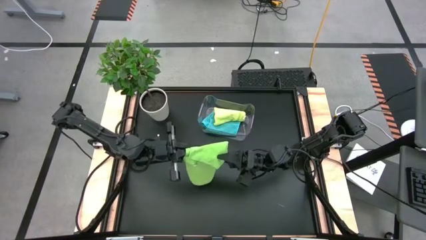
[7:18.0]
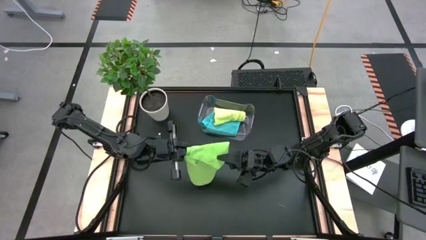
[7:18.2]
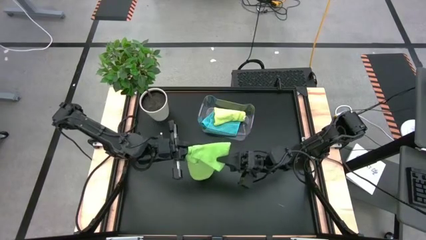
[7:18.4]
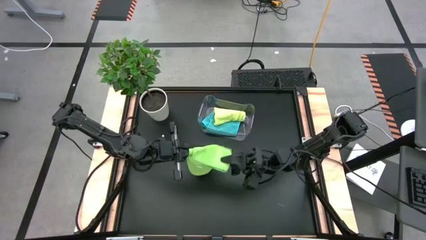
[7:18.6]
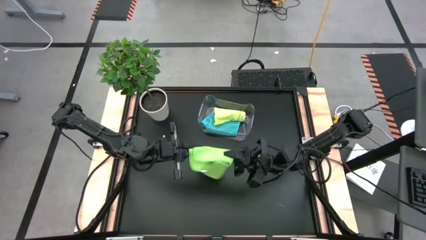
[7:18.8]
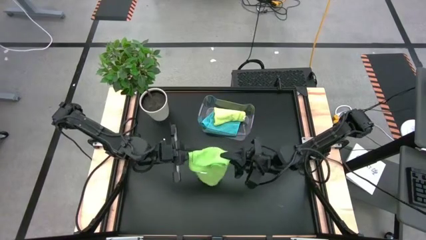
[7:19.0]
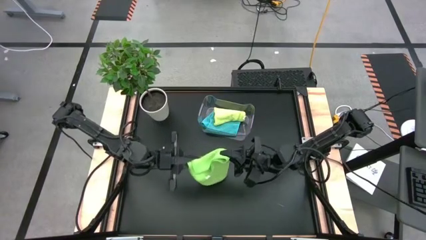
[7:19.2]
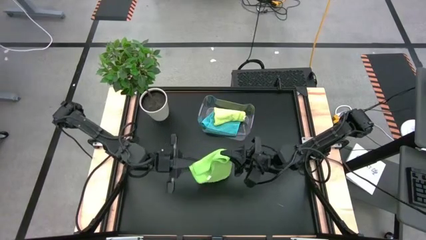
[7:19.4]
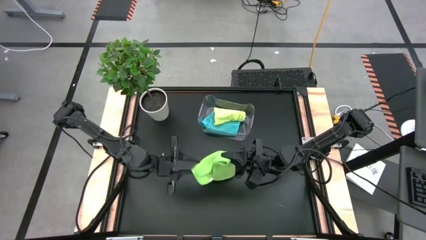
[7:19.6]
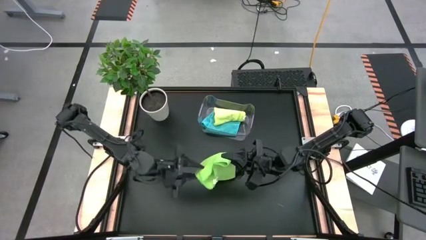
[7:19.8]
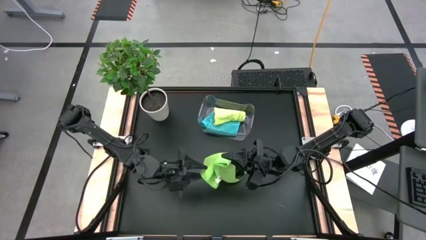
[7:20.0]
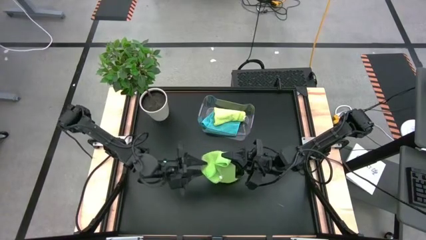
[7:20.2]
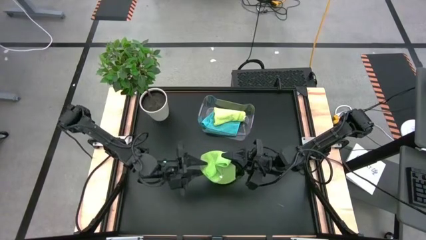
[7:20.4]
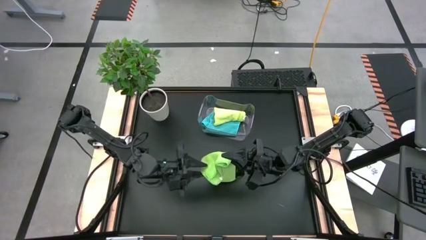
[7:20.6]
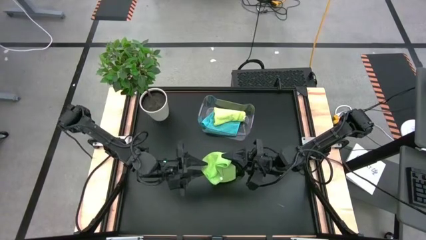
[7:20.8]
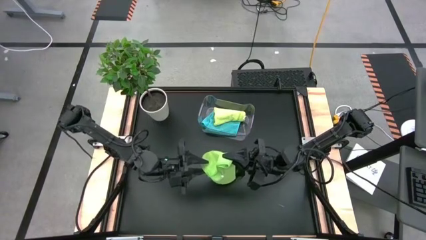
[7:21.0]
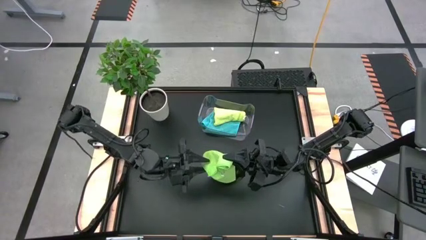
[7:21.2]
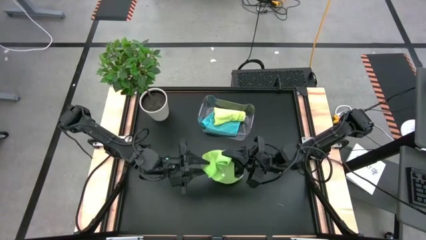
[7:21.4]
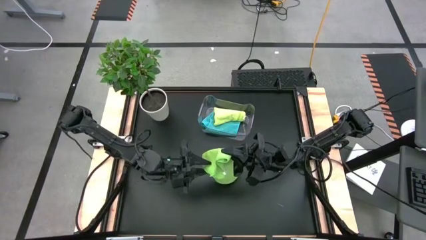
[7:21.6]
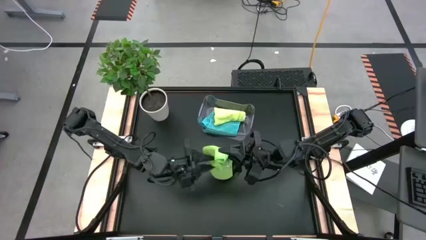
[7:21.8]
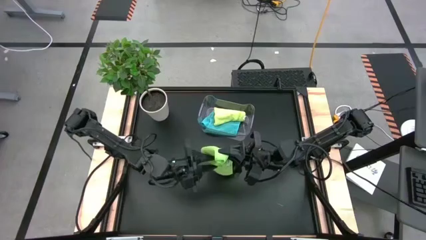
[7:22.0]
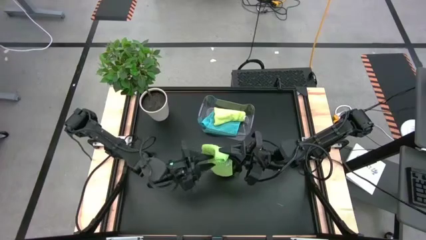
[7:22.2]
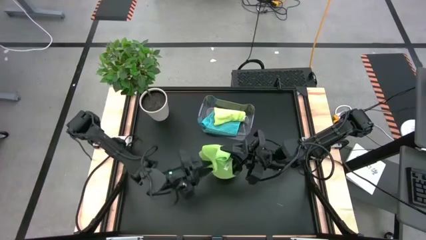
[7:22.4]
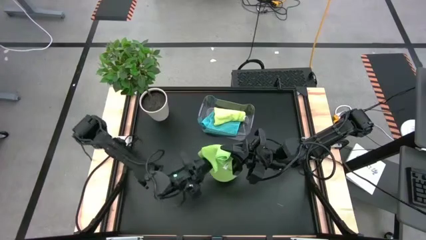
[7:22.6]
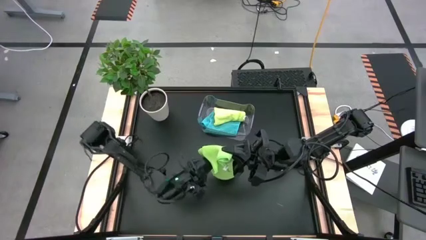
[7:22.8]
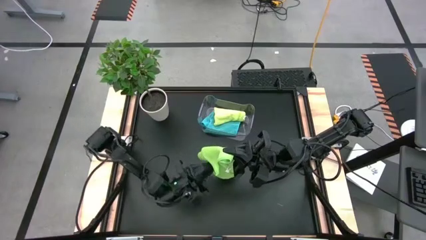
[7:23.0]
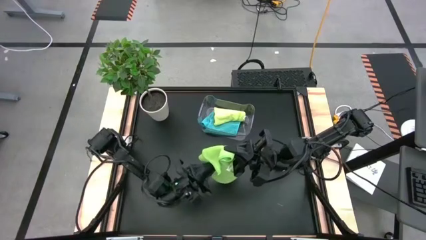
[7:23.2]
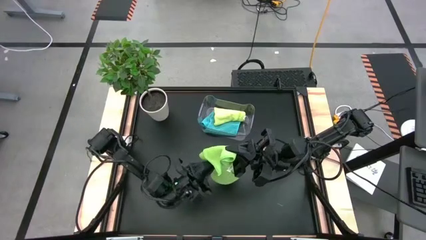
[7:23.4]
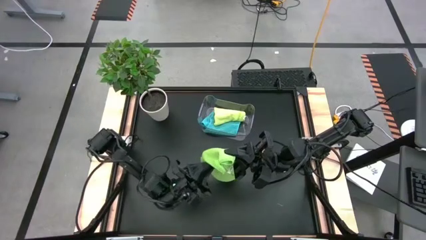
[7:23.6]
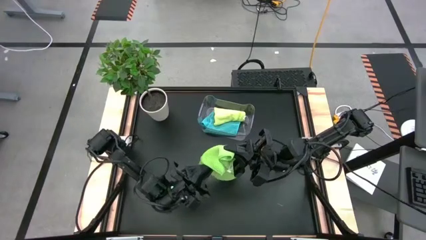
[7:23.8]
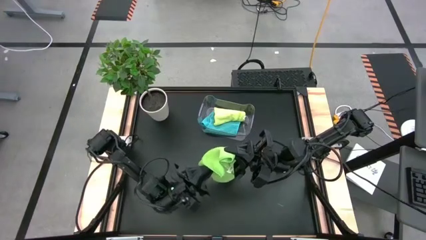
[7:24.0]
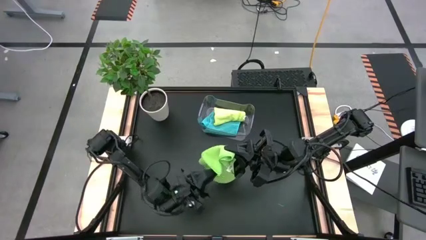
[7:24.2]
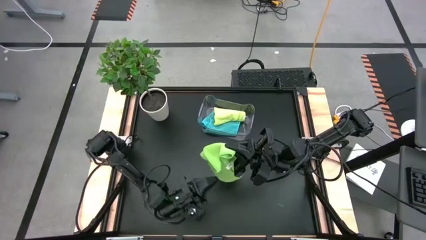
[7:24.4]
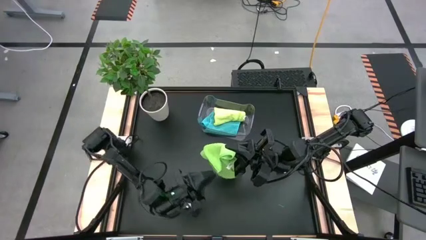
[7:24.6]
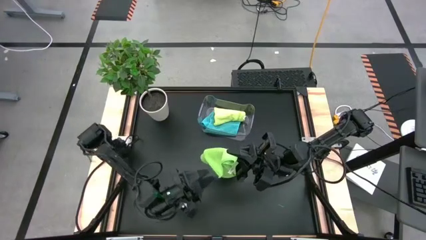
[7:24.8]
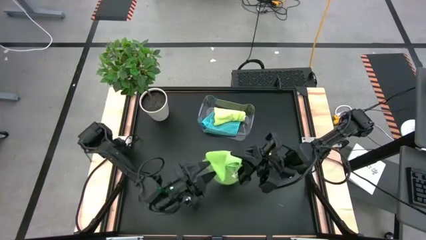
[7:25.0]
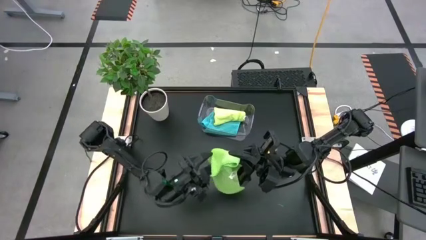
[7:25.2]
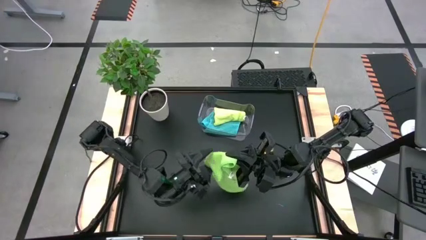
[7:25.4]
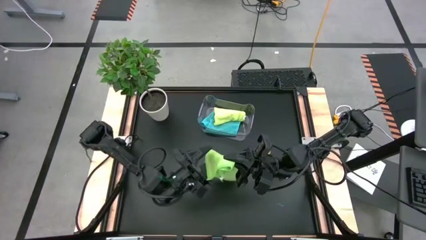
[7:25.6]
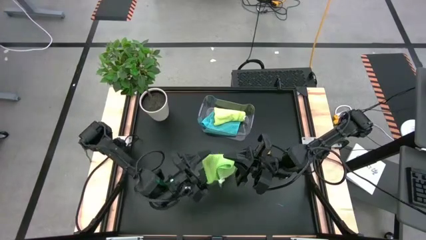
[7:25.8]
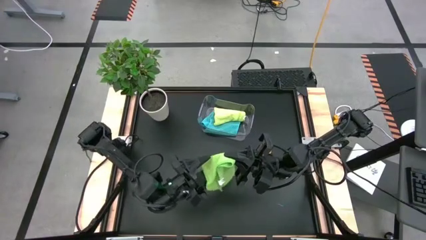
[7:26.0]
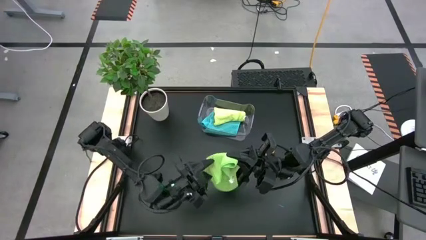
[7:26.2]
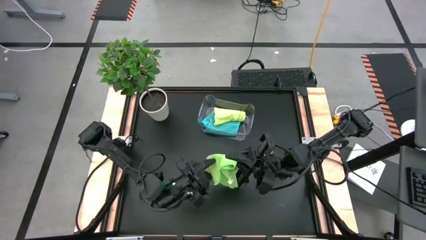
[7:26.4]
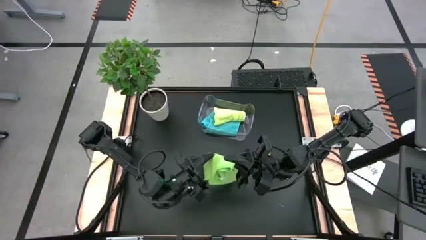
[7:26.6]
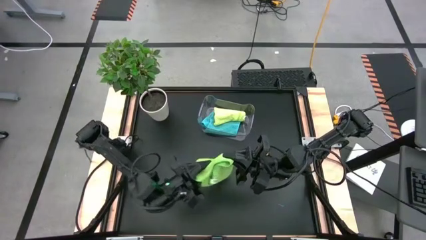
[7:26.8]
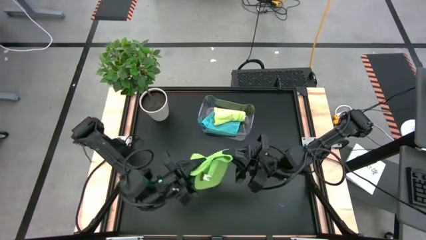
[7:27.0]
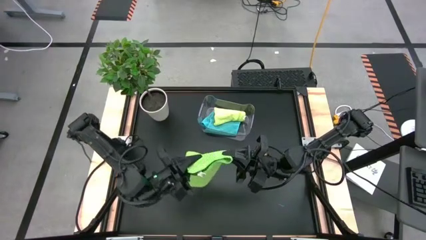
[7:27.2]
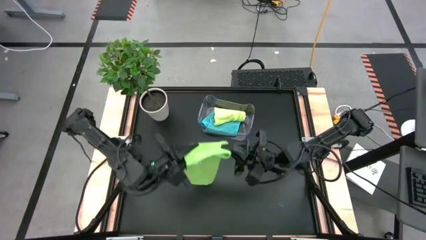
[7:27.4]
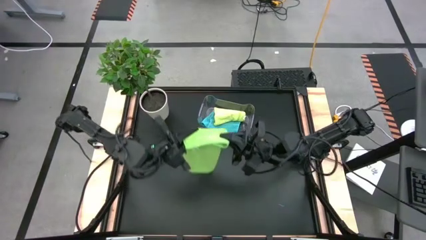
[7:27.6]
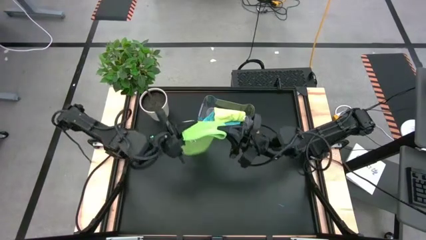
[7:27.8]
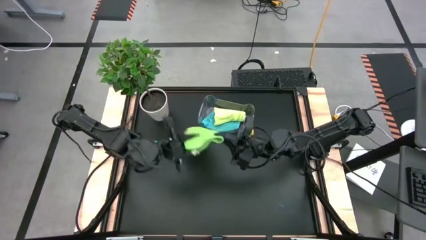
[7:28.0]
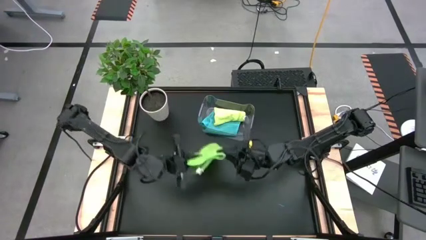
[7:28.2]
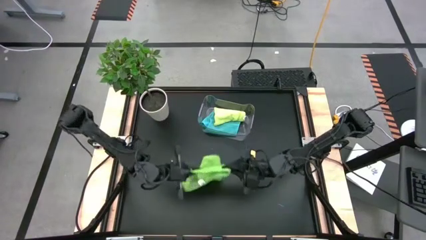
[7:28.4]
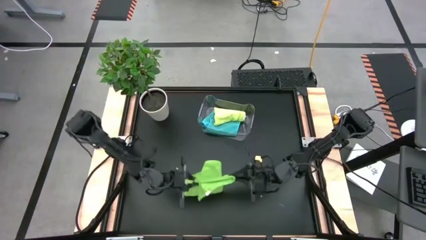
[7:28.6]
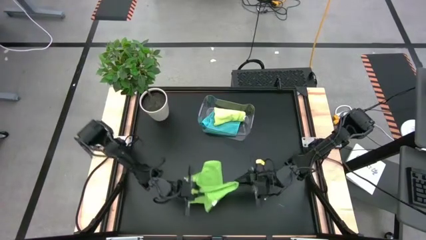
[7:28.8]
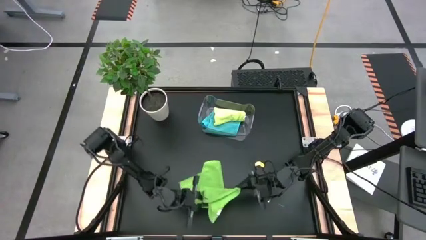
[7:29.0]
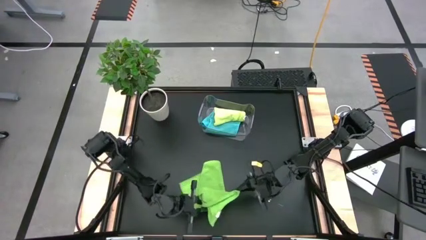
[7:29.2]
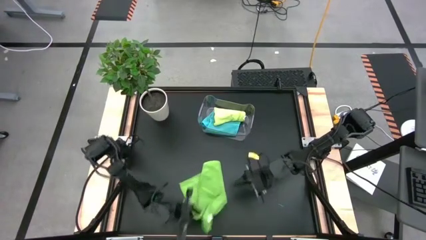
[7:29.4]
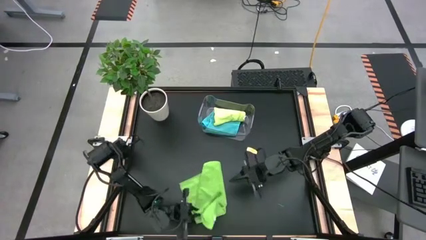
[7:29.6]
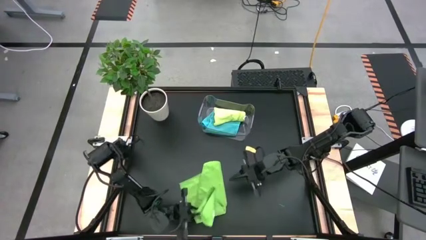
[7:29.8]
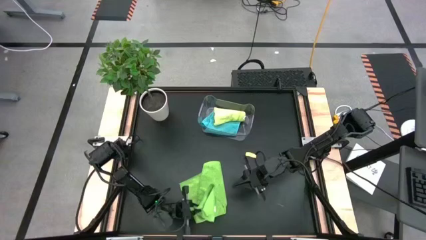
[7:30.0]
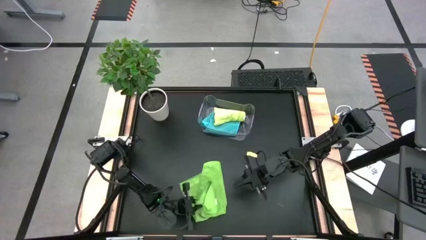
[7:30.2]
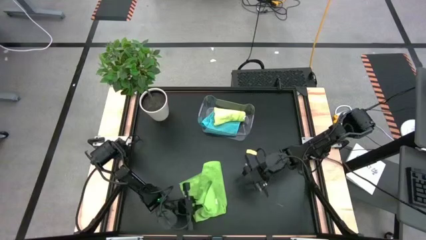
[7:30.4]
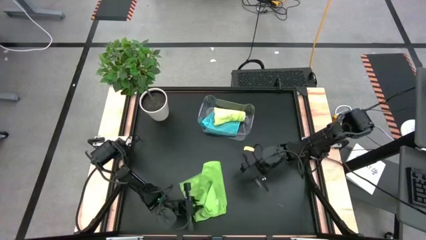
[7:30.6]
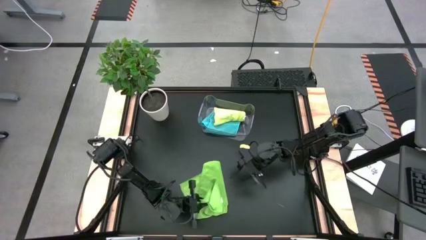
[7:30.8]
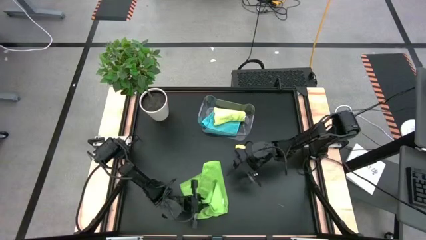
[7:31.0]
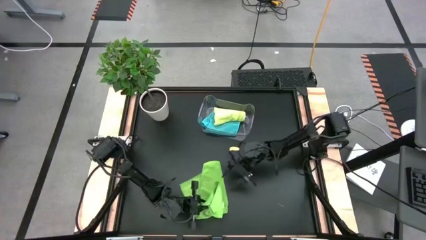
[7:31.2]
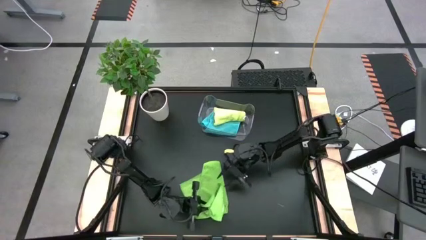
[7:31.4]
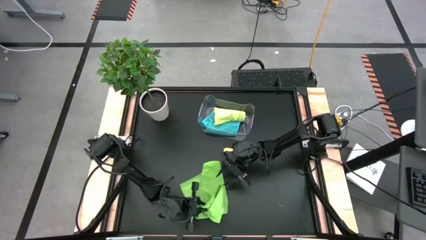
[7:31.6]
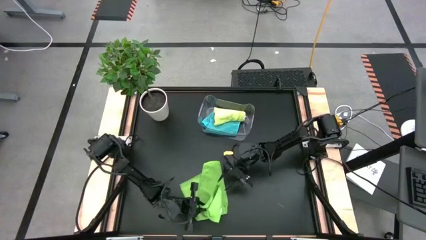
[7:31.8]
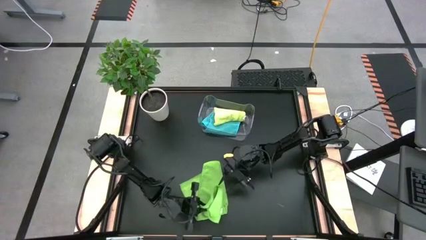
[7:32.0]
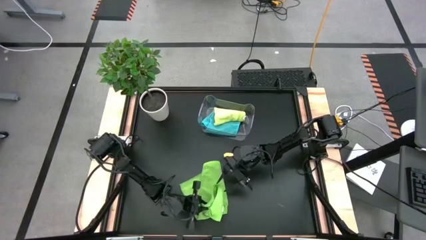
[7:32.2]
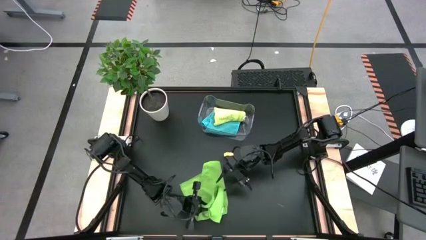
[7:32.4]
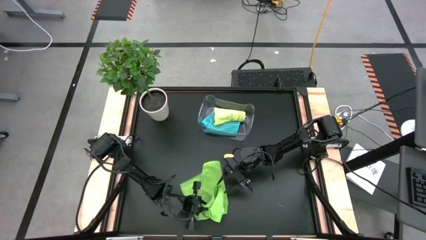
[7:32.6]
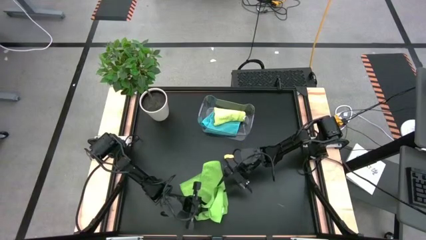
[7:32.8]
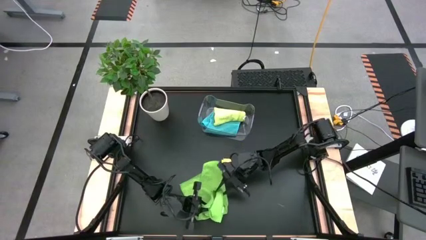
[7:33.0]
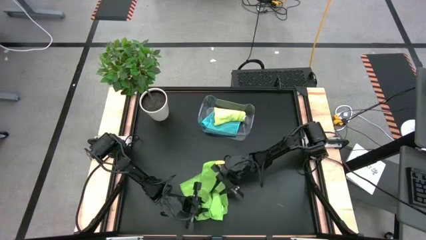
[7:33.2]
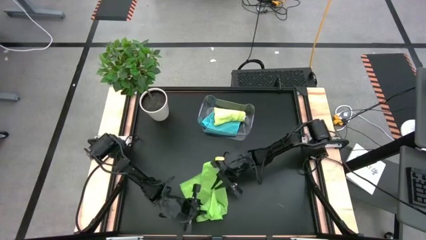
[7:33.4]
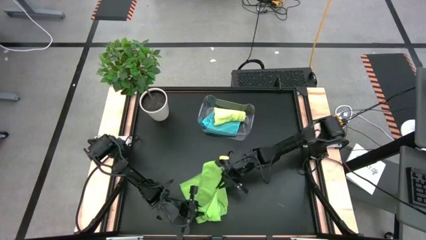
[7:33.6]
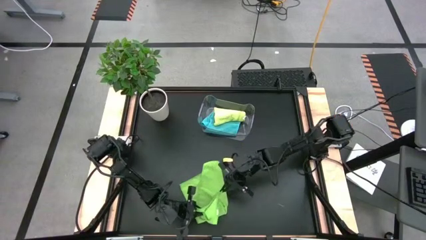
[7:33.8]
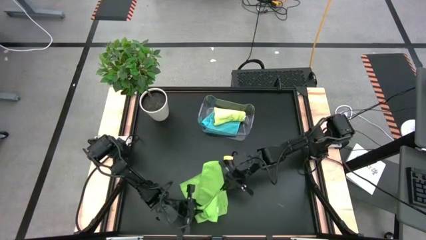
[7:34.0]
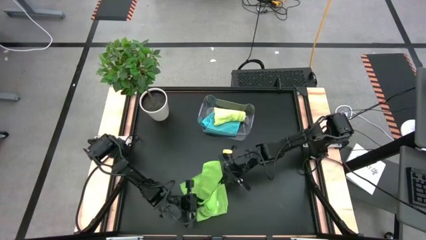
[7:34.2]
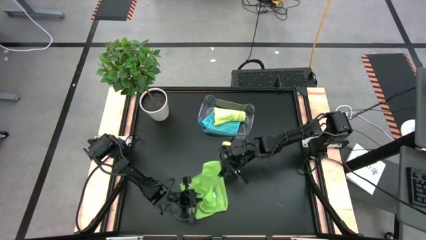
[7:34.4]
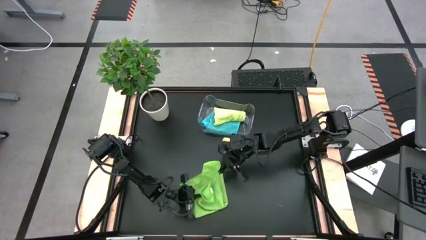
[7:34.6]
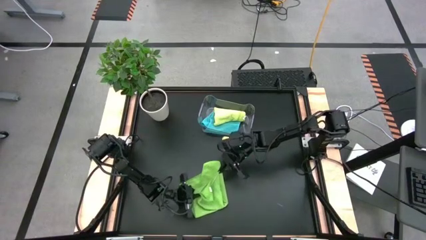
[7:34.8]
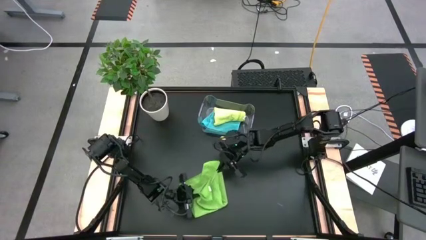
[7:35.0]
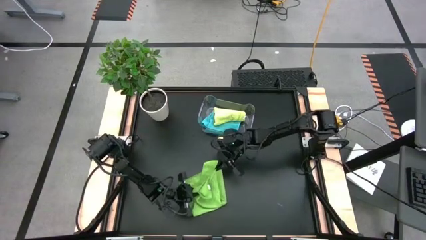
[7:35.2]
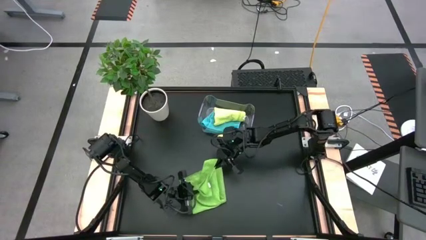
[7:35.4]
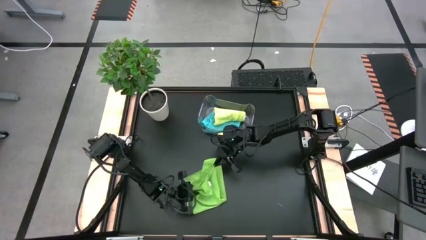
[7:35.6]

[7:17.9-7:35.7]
Task: Fold microfiber towels
Fold the green towel
